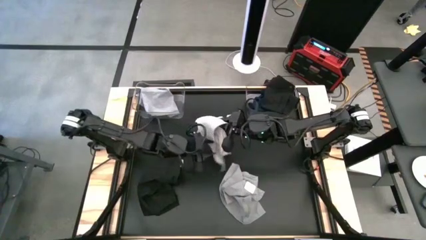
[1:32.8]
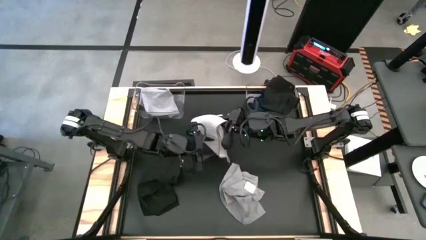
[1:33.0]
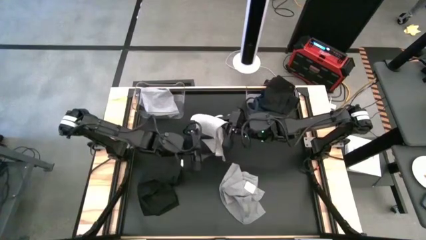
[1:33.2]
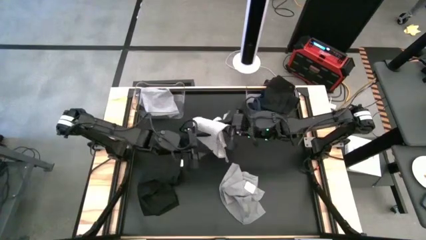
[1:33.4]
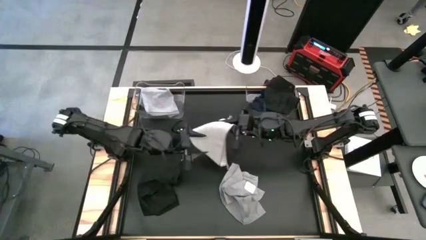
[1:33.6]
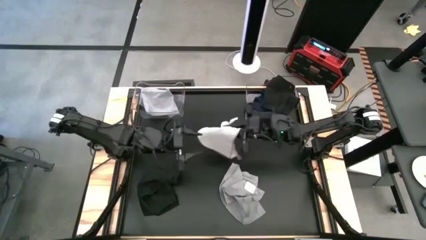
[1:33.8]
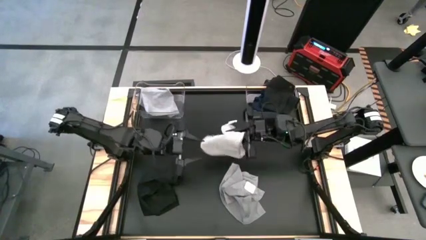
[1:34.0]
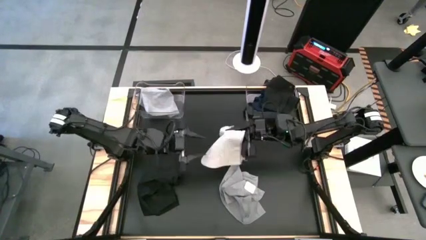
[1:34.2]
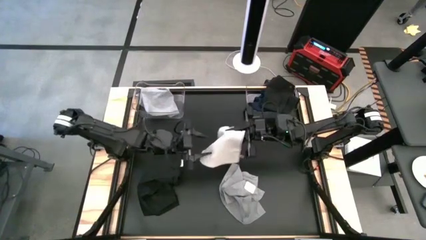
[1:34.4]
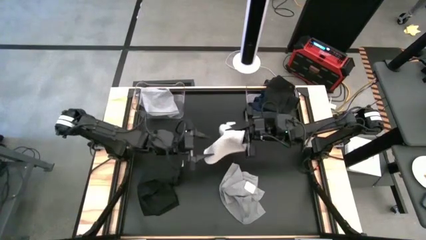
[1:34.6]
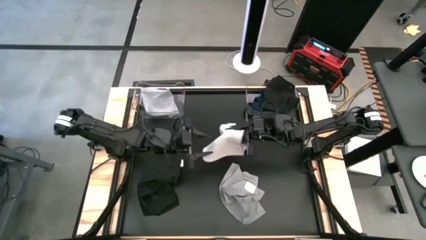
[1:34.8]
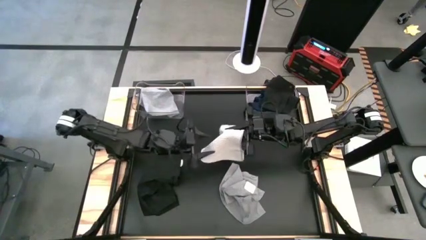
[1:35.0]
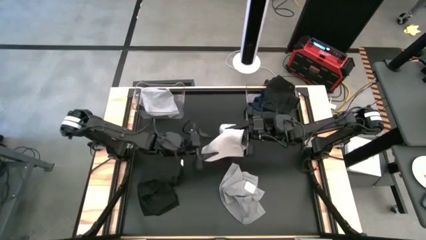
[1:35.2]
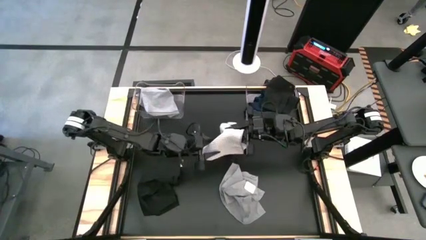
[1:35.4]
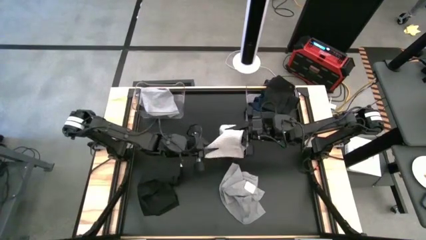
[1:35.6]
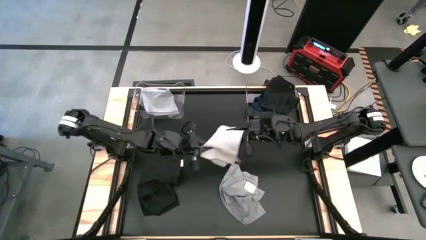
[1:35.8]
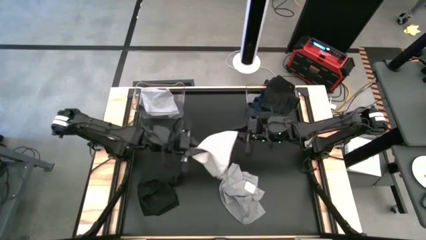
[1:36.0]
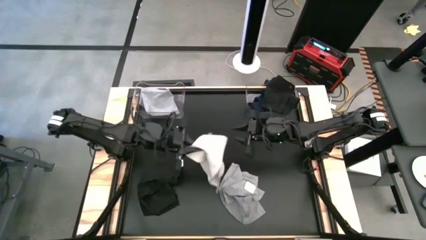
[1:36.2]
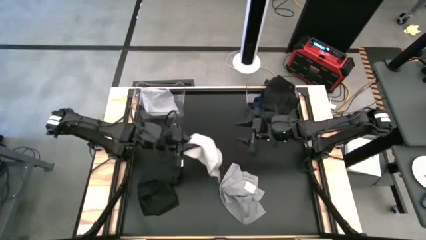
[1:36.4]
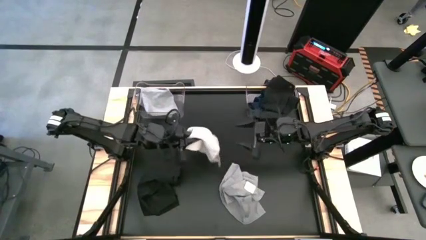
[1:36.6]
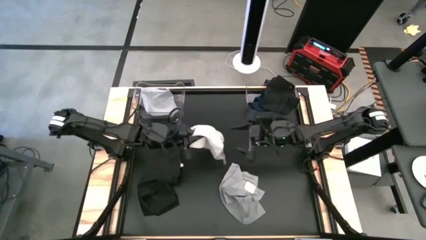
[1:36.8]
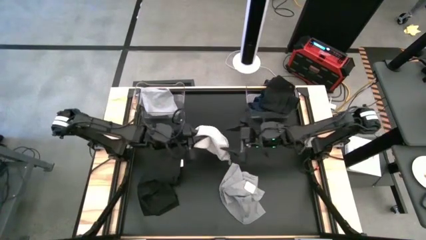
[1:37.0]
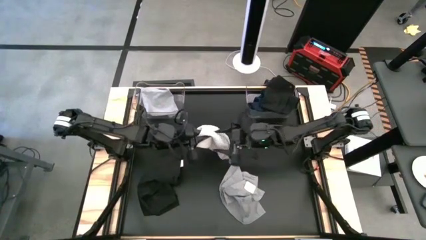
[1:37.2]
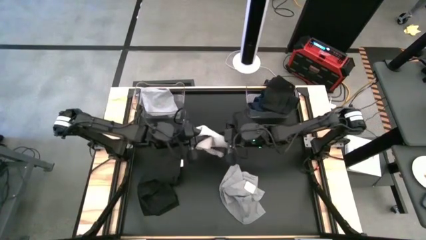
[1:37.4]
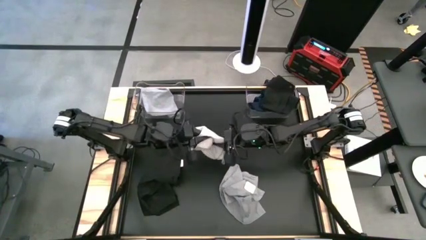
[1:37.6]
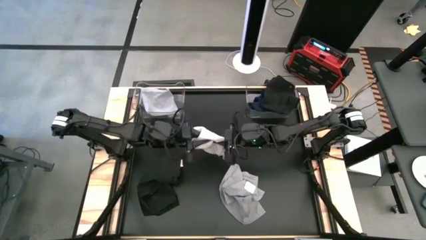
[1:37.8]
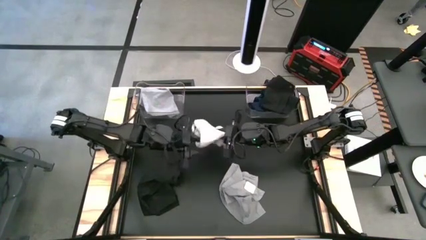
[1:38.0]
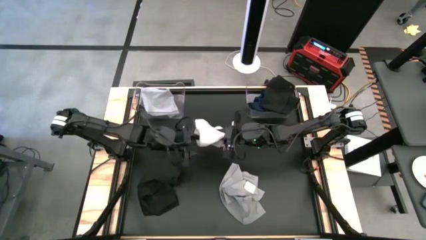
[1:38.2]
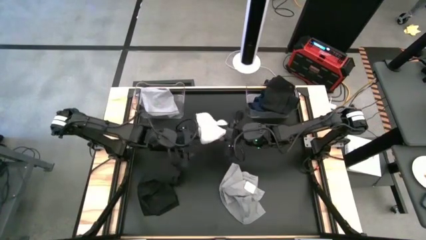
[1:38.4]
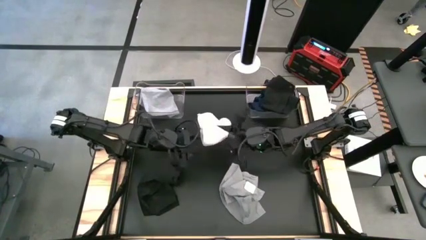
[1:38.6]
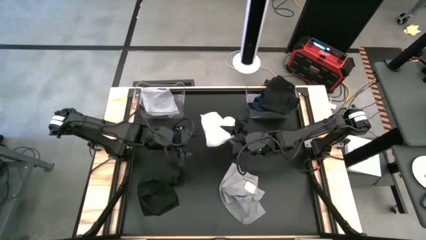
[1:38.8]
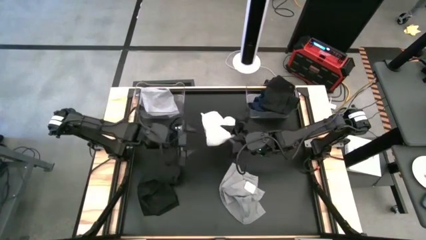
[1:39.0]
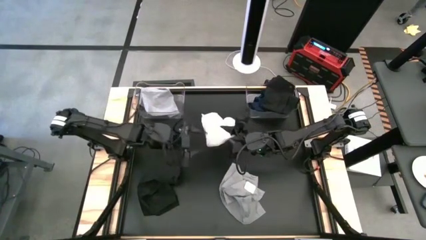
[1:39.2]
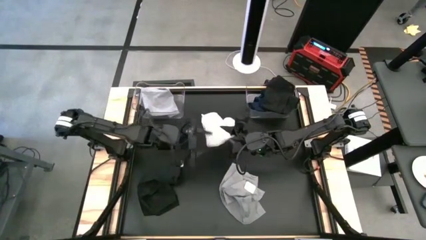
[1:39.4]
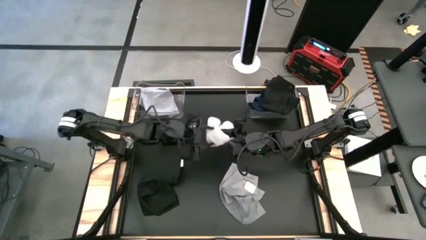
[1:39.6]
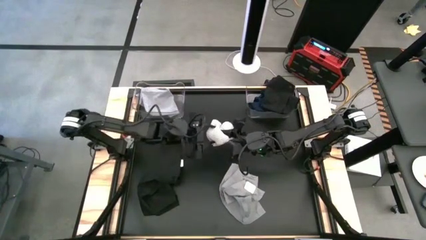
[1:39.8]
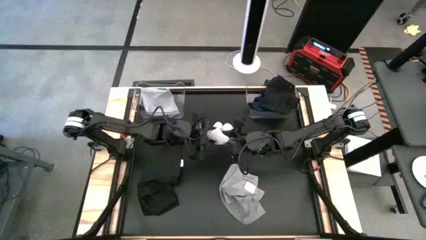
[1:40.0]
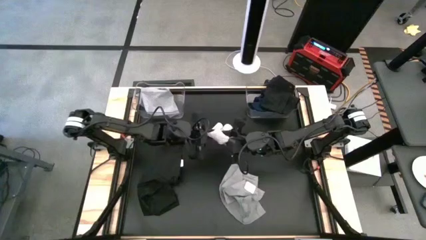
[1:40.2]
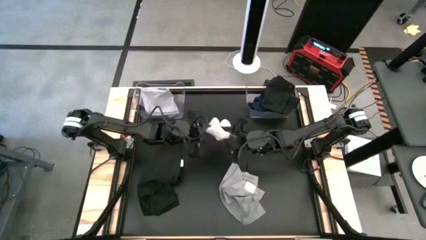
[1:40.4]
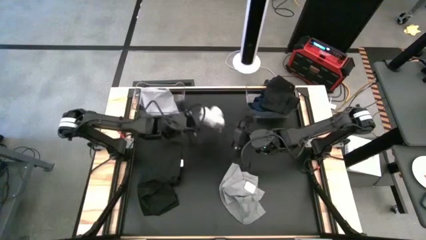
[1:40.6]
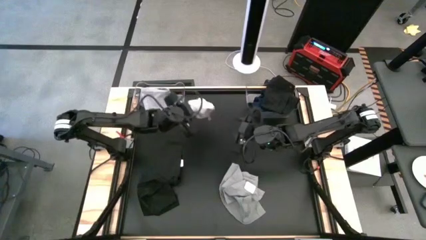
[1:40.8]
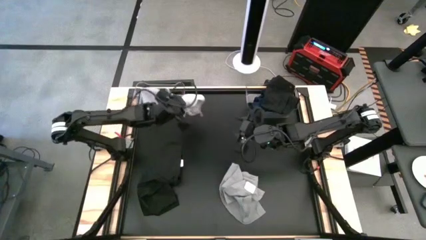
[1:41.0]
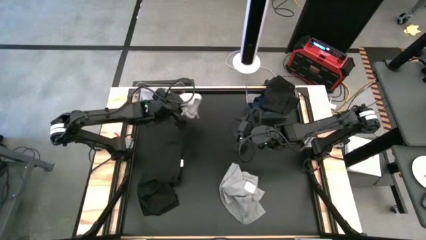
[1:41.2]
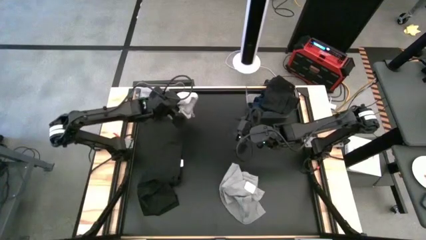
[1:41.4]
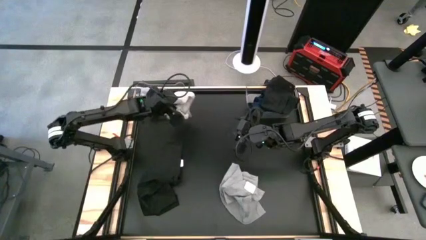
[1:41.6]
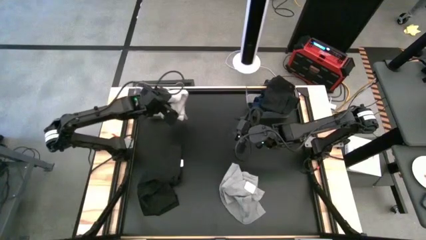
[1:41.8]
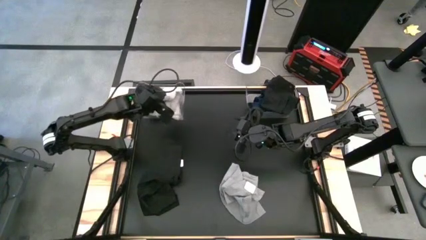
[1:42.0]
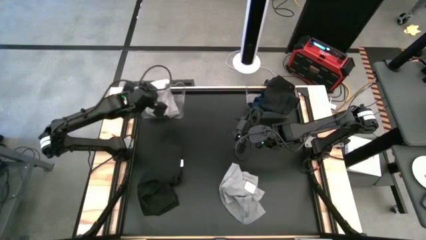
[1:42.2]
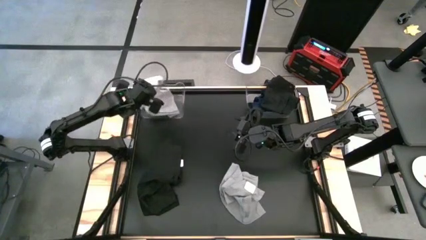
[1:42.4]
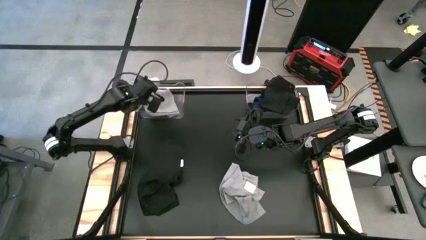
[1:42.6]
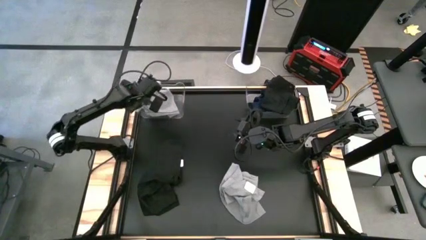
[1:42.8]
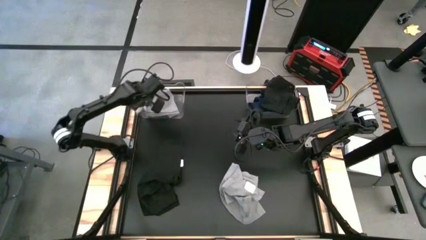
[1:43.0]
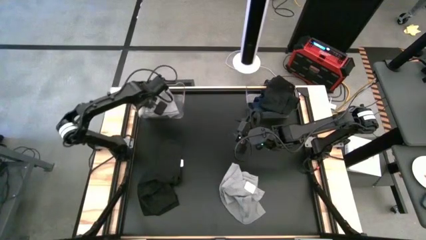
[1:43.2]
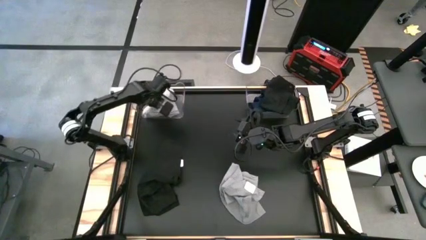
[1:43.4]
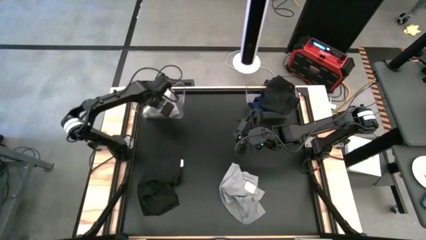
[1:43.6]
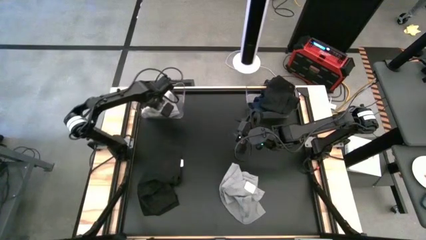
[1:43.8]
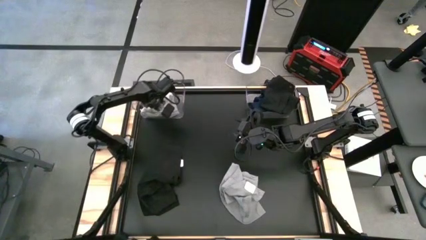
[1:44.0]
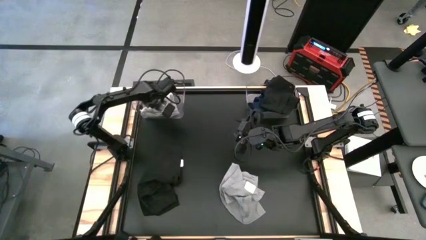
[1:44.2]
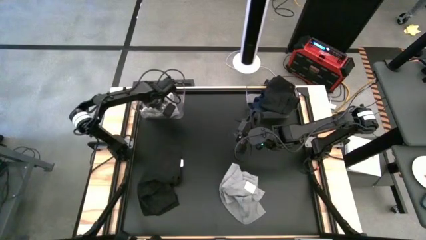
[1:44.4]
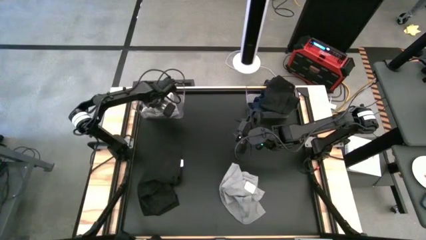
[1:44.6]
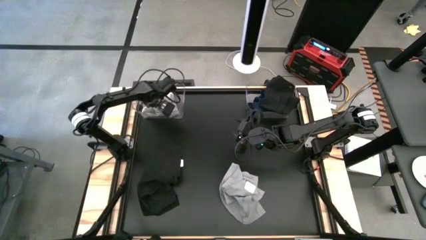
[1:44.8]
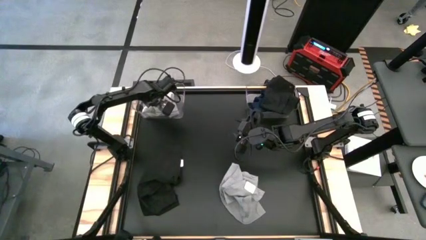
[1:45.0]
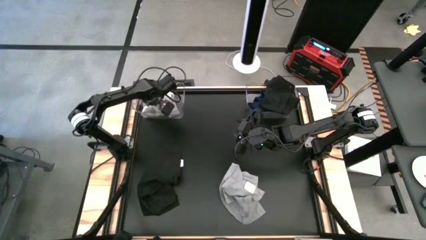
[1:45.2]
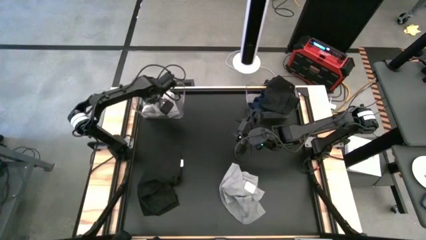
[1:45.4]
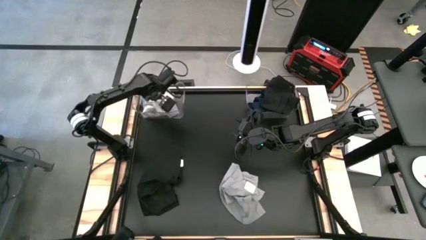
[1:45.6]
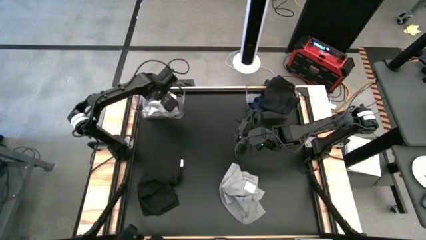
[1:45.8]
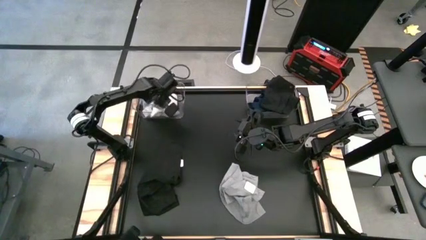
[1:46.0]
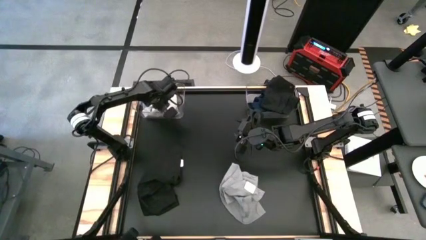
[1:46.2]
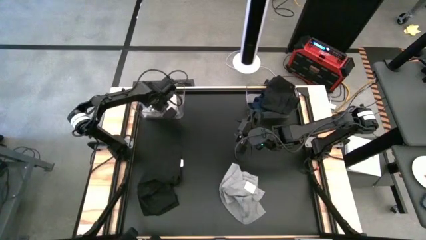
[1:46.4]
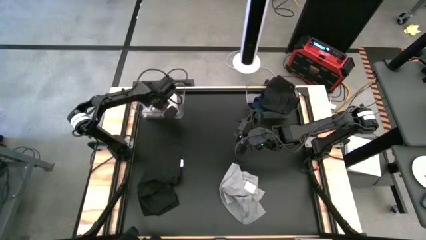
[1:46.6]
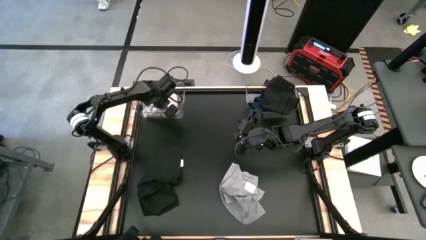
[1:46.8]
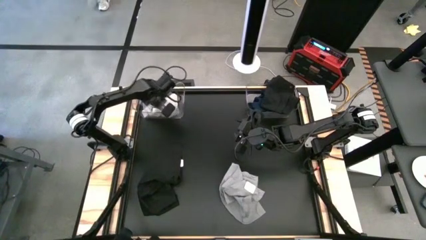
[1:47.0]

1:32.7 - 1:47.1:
Task: Sort towels by color in basket
Put the light gray towel into the left transparent bin
